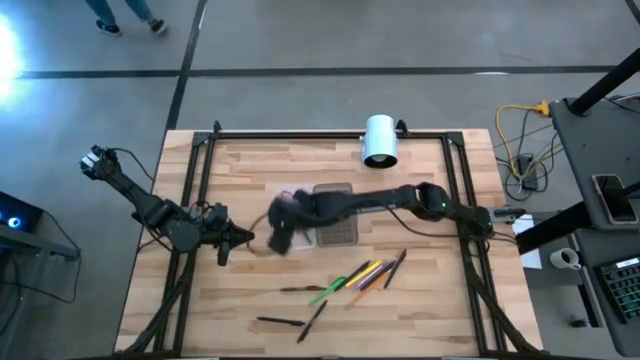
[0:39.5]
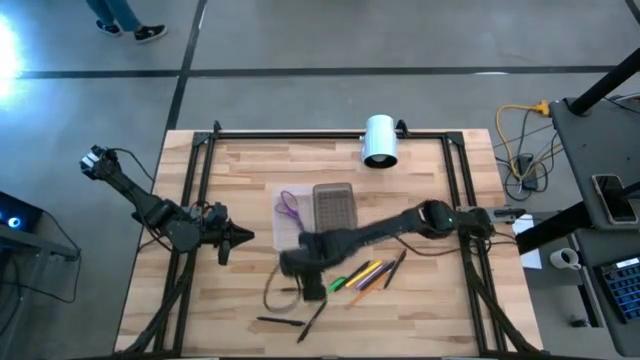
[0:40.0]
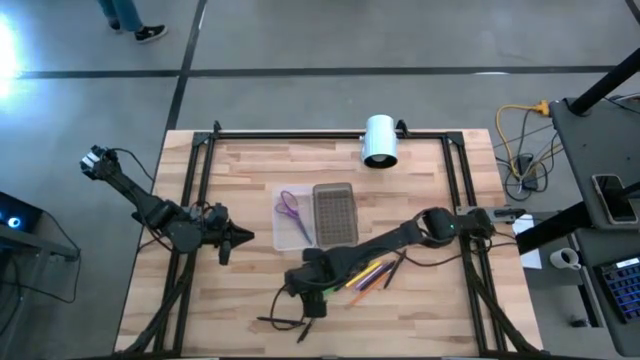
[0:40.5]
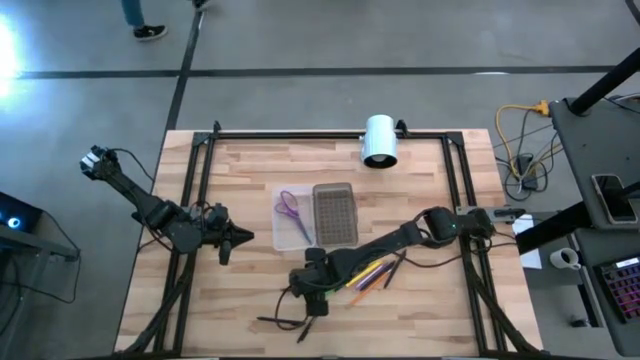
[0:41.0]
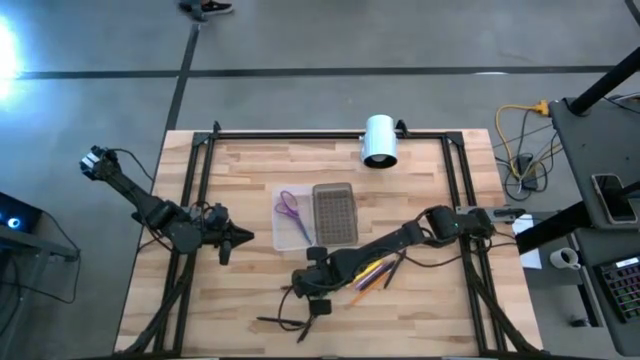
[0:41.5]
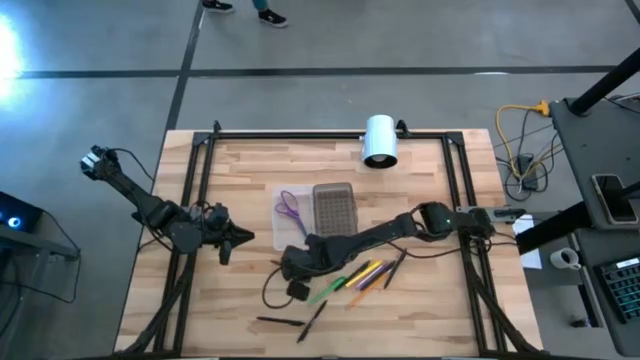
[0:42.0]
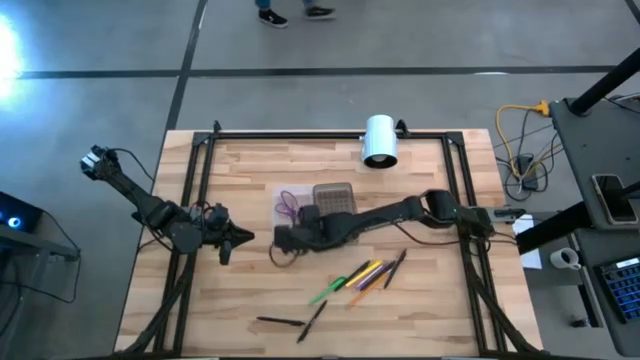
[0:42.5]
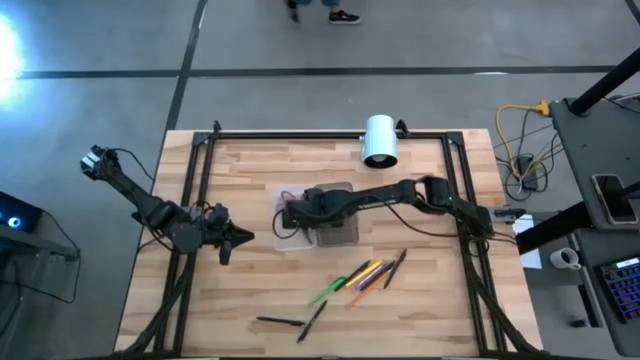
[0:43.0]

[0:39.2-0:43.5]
Task: Pick & place school supplies into a supply box
Put the brown pen into the black supply box

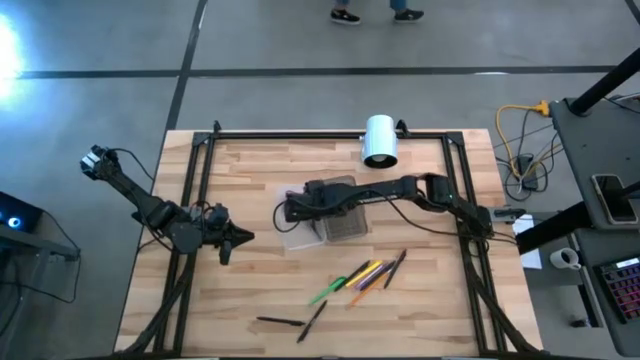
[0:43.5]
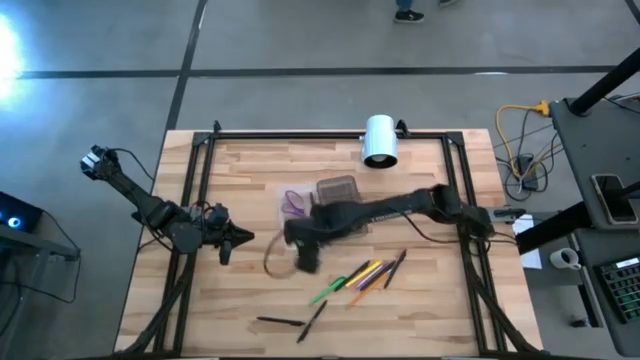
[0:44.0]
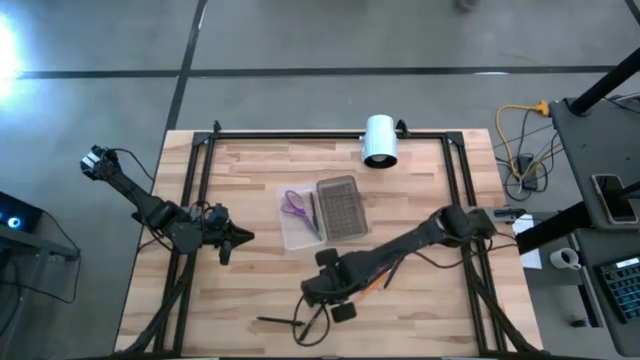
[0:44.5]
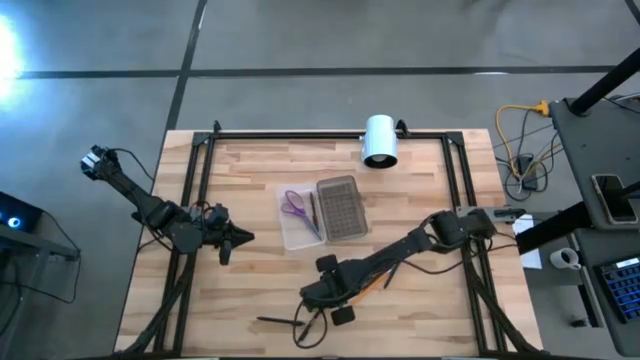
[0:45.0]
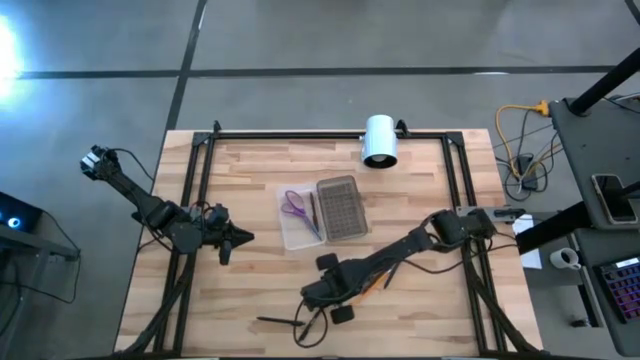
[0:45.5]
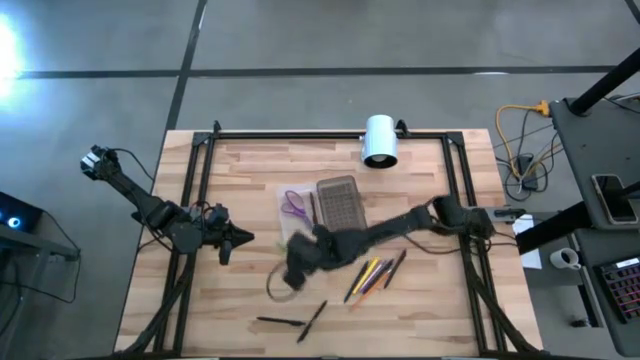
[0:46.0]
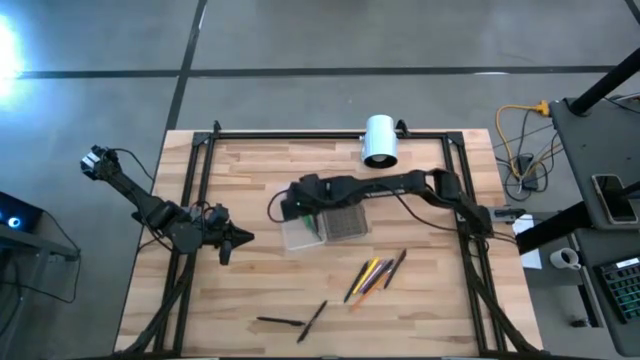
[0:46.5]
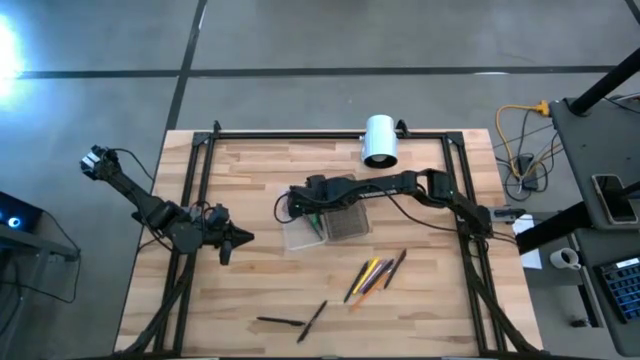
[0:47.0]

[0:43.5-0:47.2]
Put the green highlighter pen into the black supply box

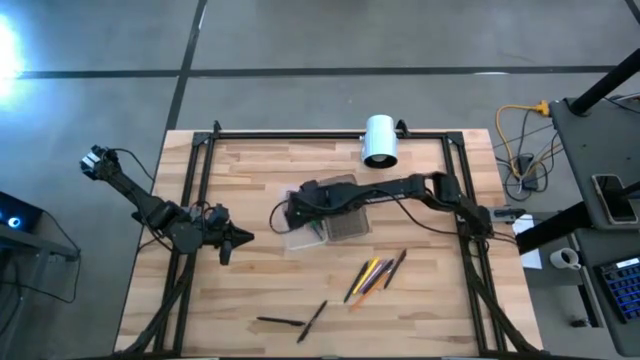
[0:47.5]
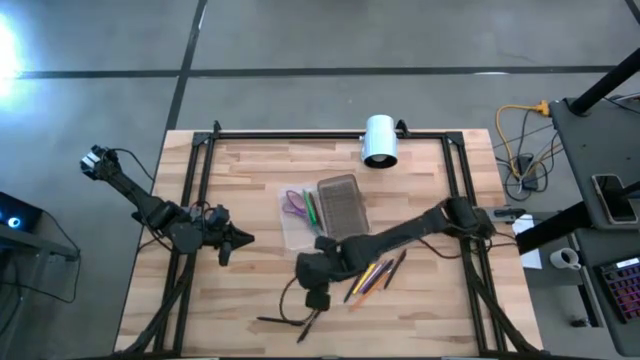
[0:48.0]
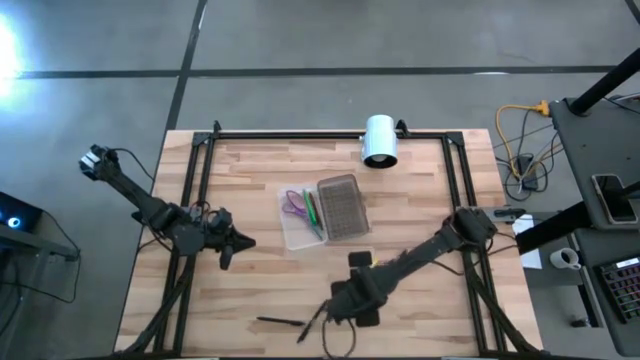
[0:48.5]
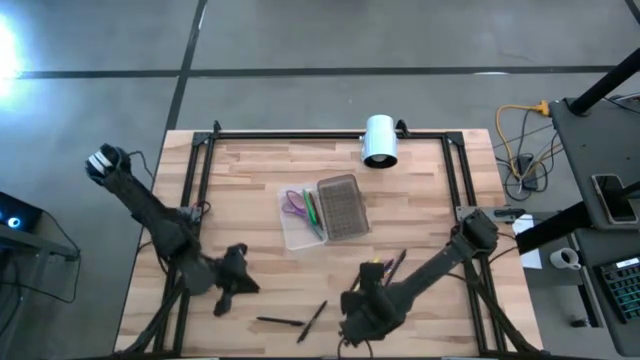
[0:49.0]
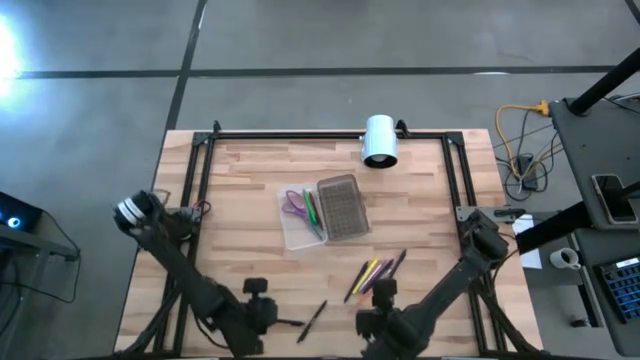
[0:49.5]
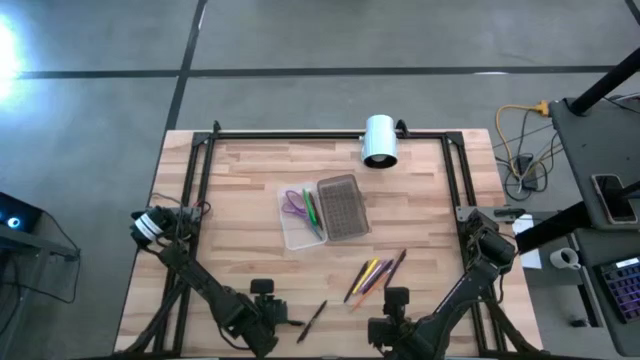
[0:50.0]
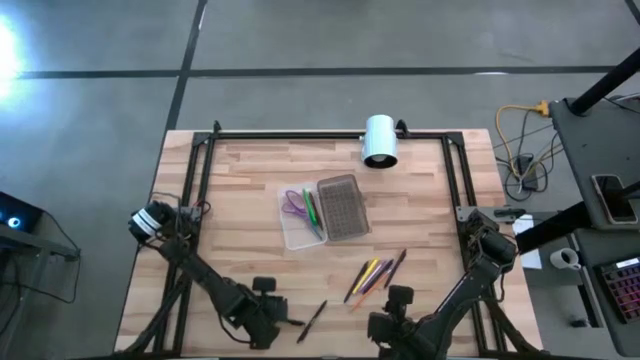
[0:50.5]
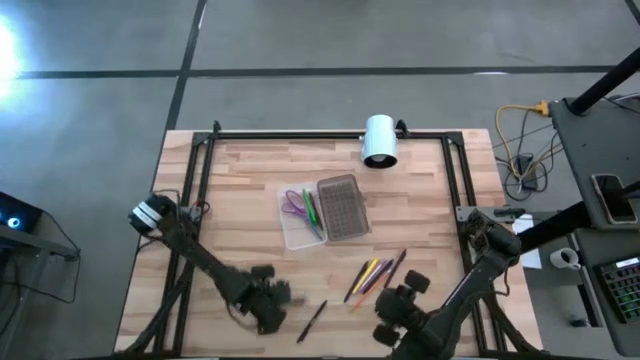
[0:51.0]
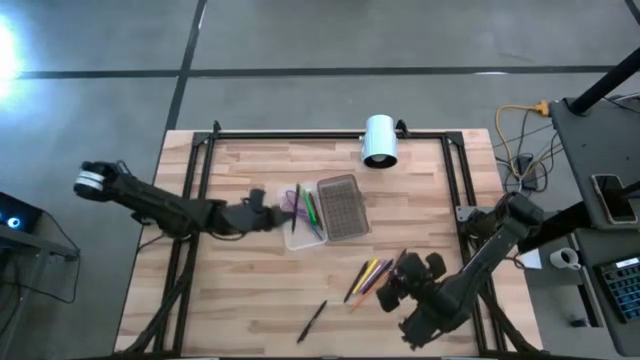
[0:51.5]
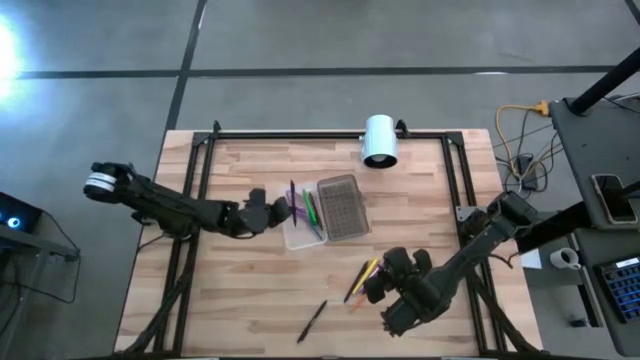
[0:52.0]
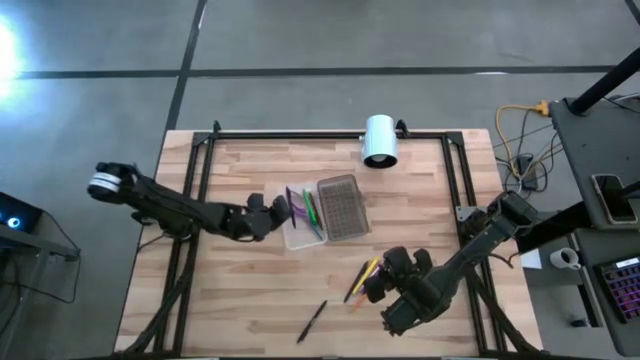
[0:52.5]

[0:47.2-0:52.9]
Put the black pen into the black supply box

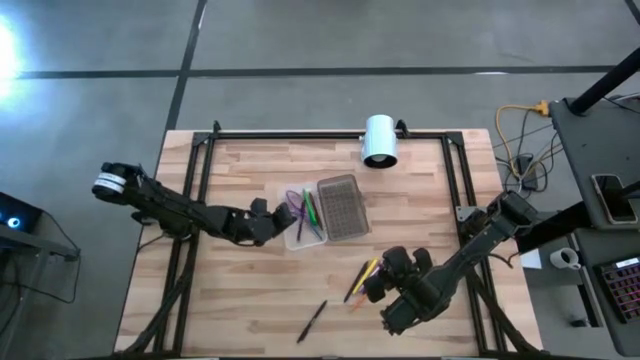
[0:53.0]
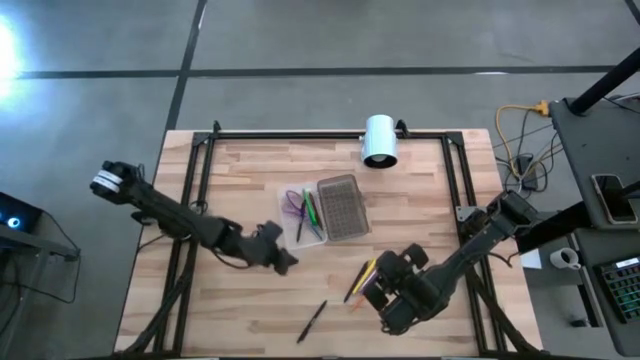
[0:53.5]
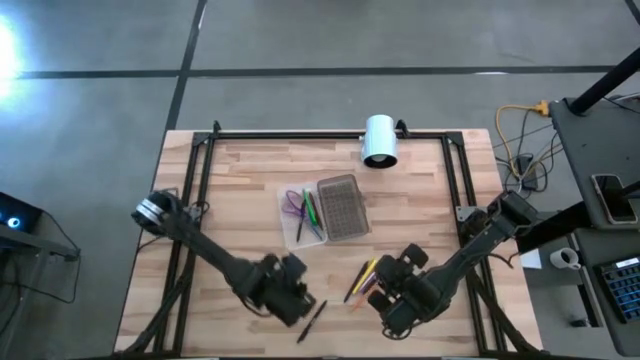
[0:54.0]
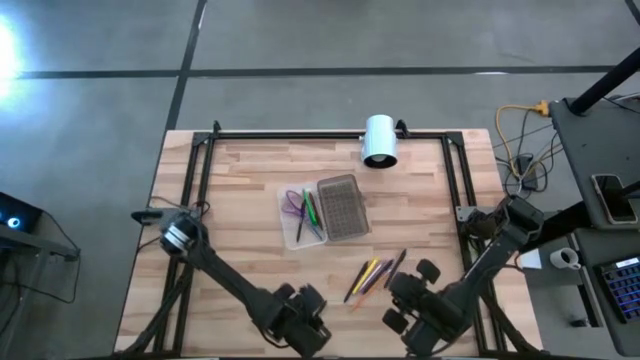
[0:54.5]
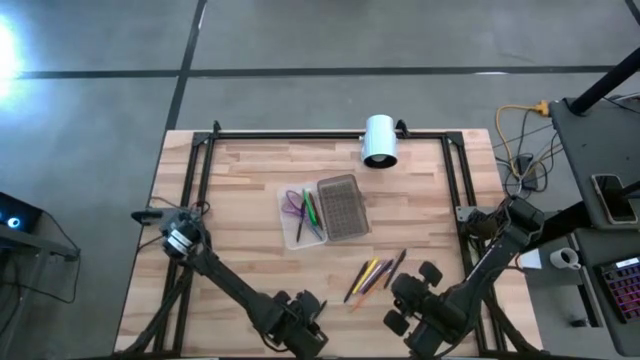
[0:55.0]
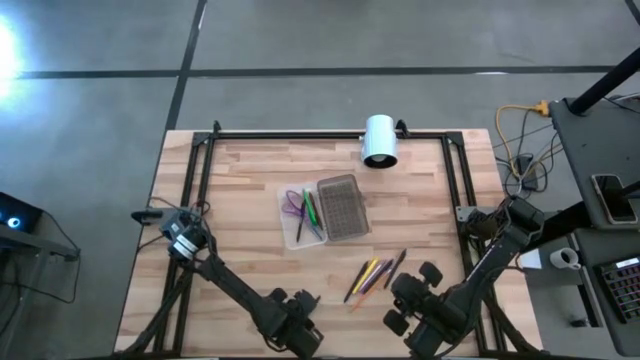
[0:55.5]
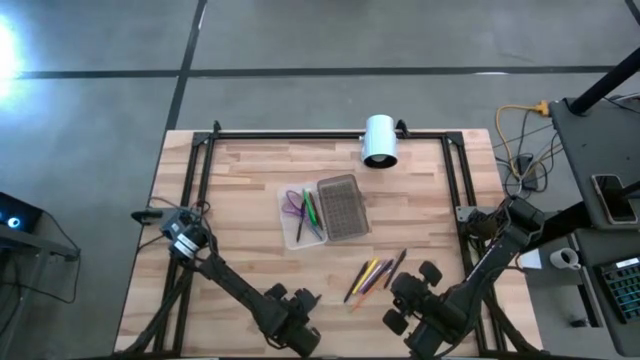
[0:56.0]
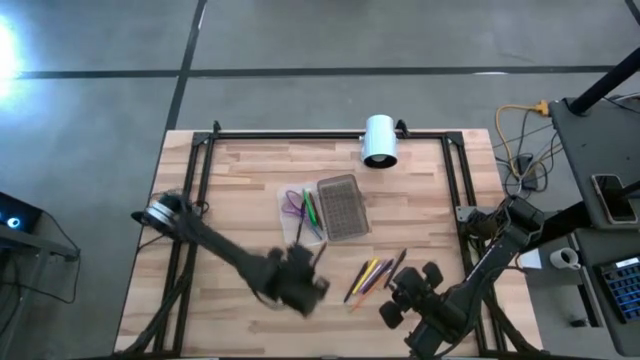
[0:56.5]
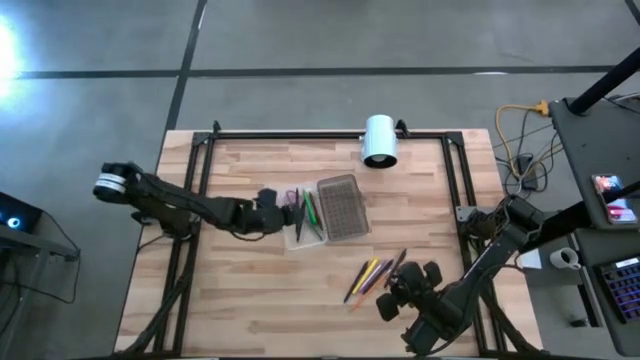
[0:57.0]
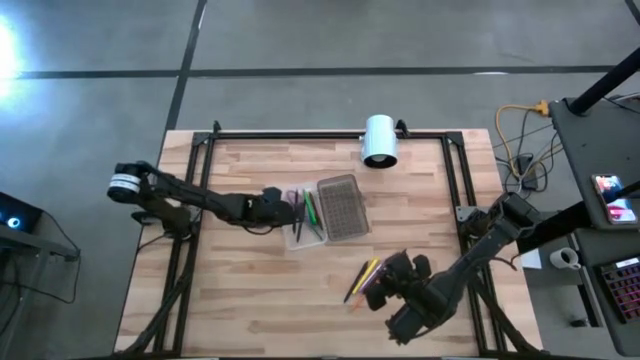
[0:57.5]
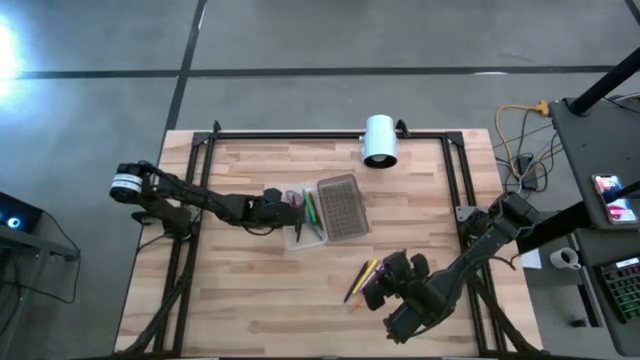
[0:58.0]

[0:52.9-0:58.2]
Put the black pen into the black supply box

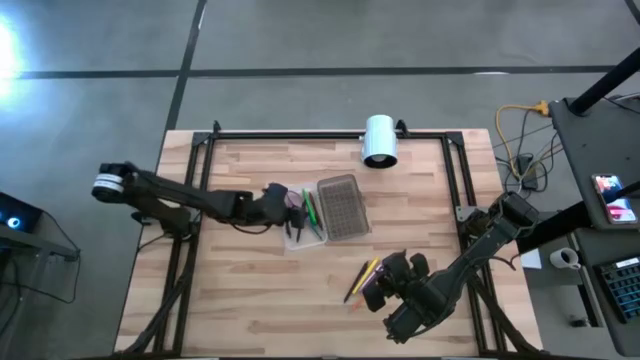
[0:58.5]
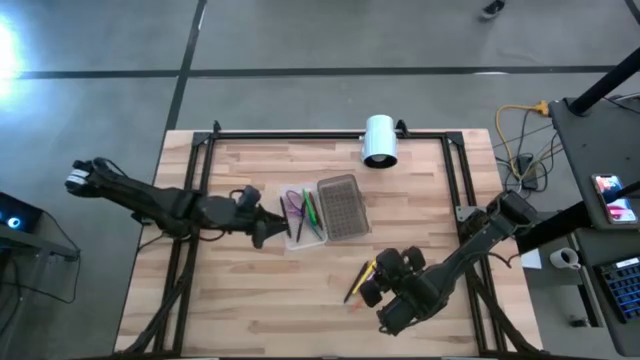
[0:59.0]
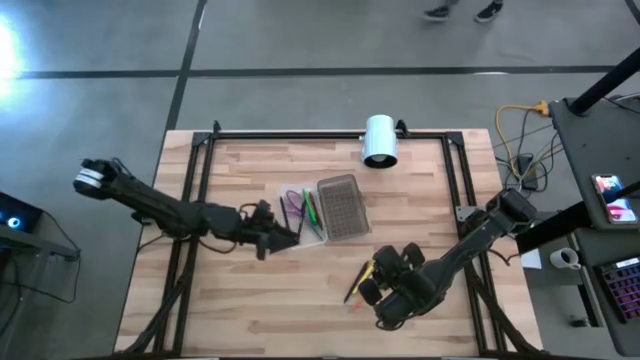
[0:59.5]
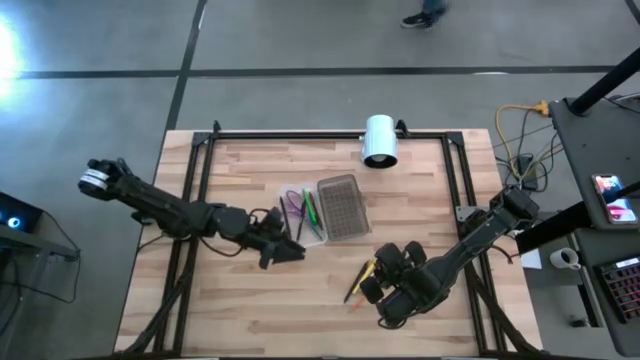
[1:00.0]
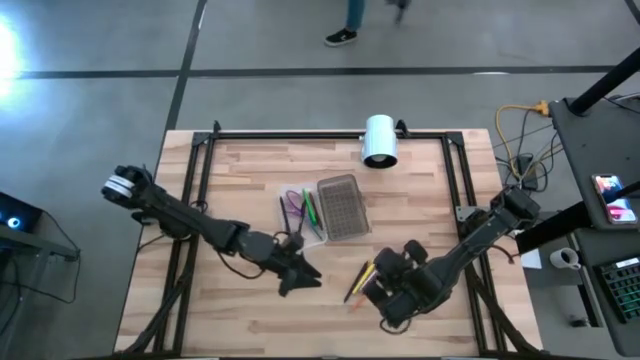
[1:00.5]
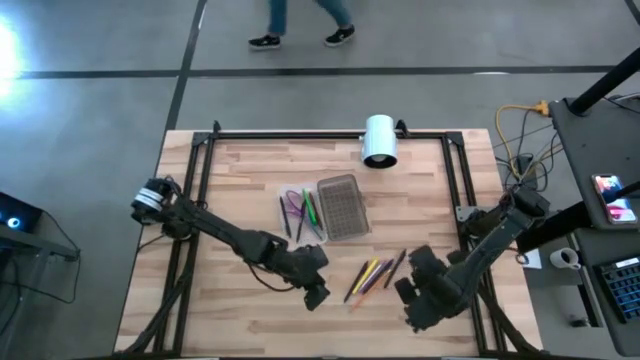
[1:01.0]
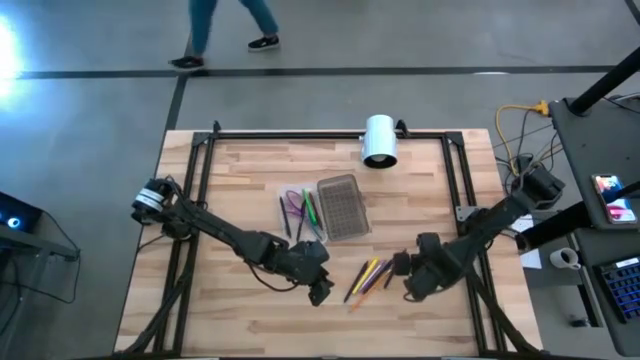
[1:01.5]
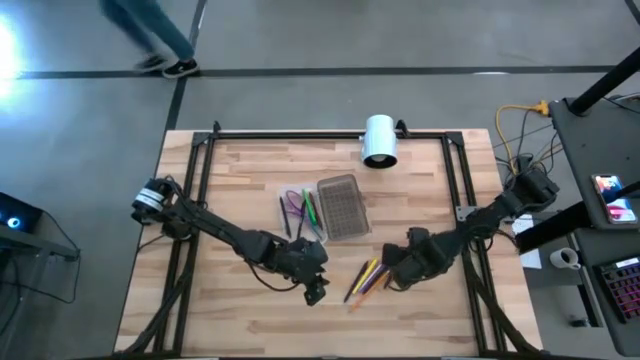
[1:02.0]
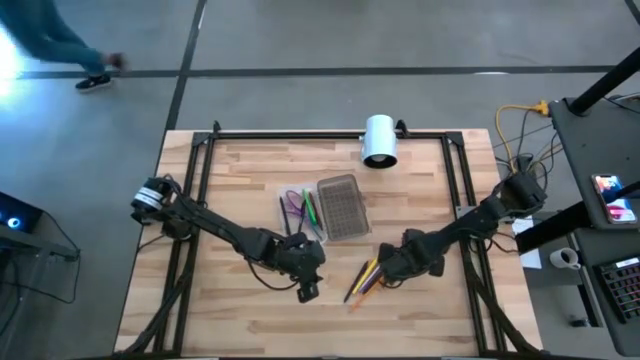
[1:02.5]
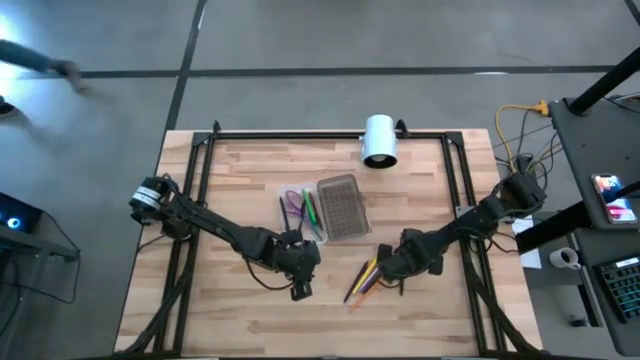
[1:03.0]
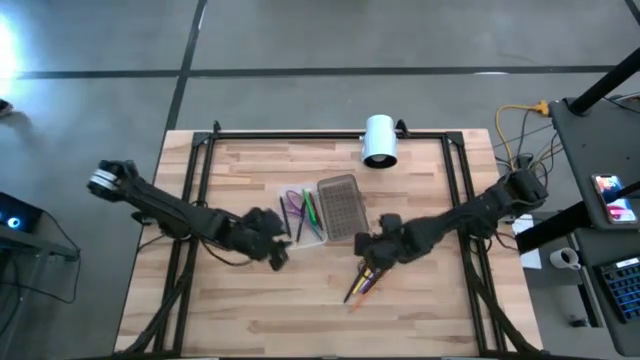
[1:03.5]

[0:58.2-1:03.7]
Put the black pen into the black supply box
